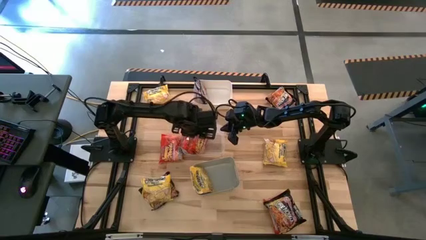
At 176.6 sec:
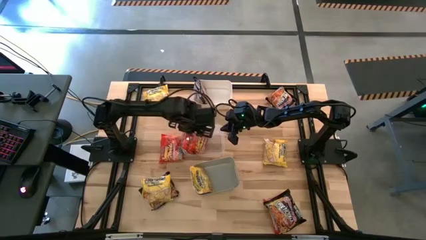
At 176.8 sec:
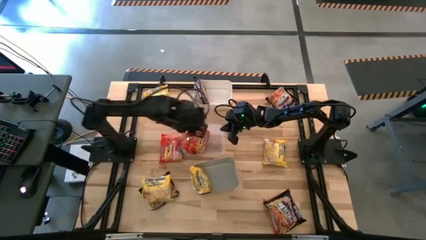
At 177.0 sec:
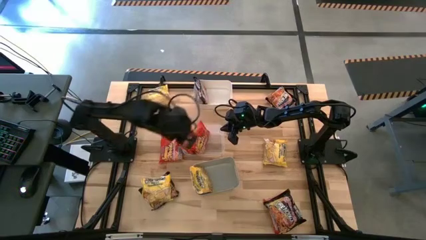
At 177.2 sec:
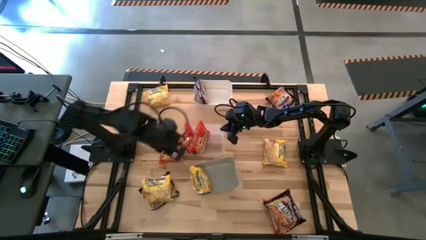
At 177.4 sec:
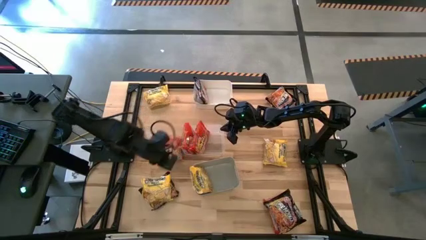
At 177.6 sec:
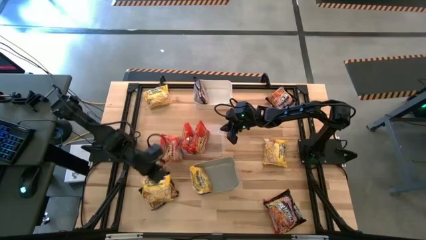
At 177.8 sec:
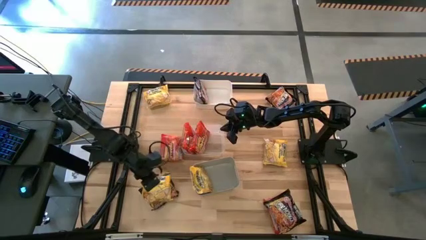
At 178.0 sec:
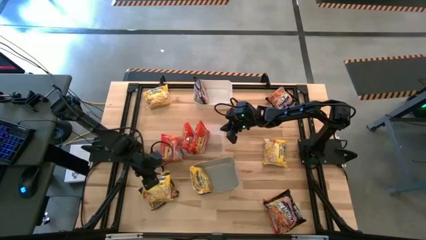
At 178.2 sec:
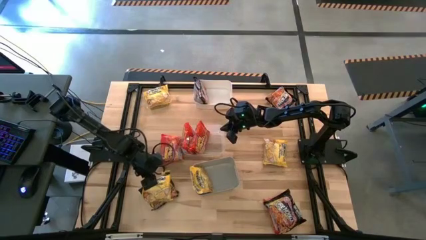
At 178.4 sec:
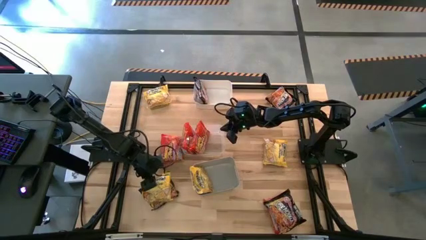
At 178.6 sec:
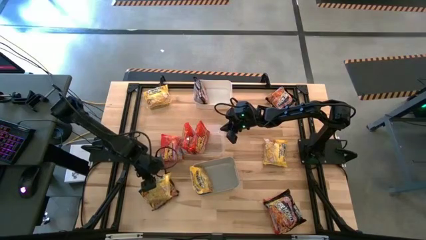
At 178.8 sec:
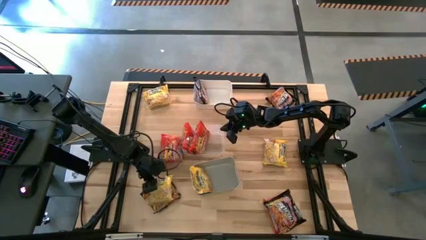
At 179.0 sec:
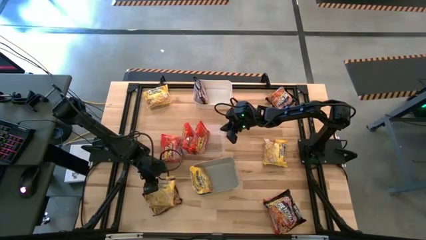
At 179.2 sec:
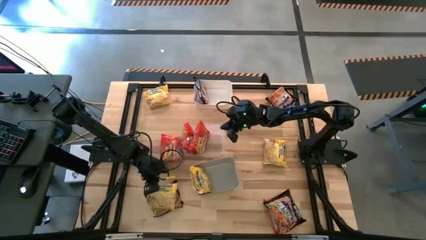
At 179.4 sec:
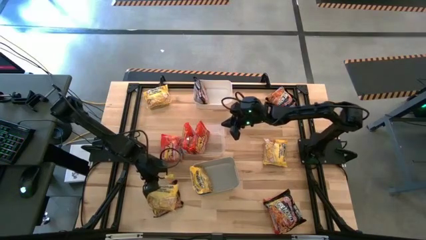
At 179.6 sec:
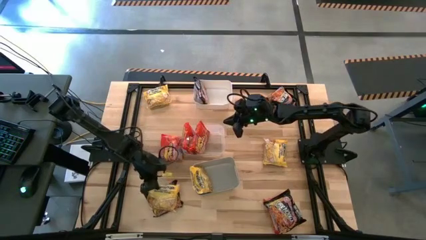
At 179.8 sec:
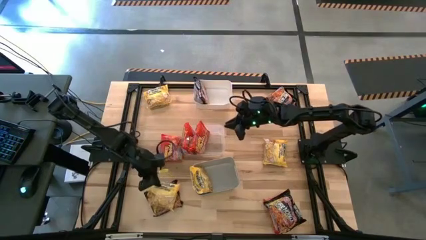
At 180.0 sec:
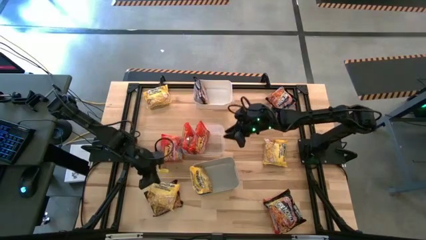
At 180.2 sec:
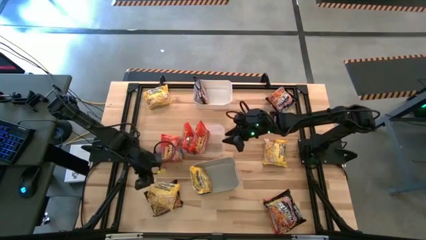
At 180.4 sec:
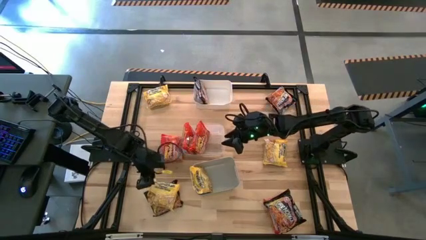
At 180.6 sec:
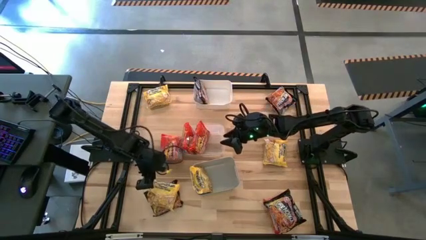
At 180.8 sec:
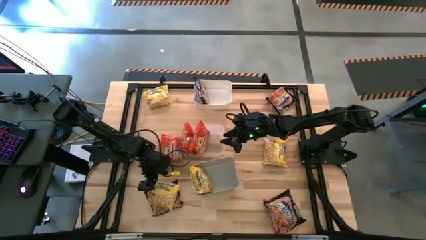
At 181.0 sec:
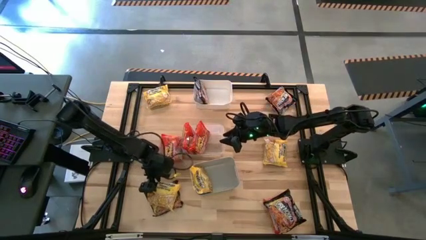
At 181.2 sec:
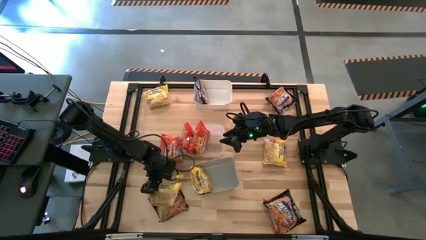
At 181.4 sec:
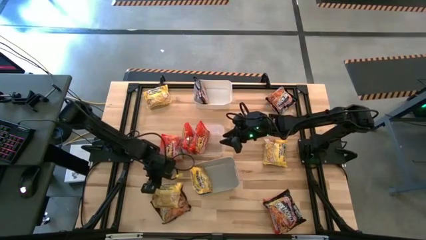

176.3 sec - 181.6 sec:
Task: Sort Maruchan noodles
Put the yellow noodle pack into the gray bin

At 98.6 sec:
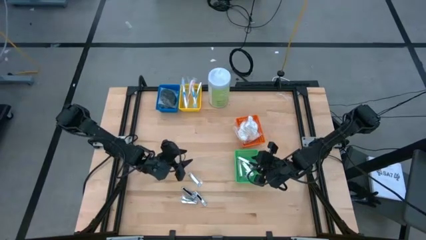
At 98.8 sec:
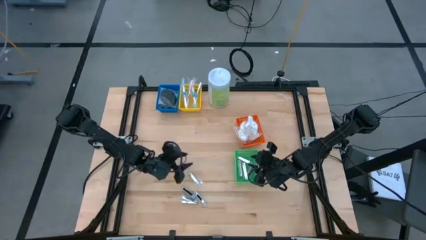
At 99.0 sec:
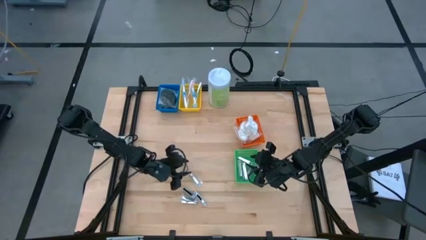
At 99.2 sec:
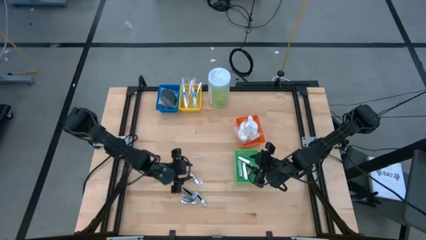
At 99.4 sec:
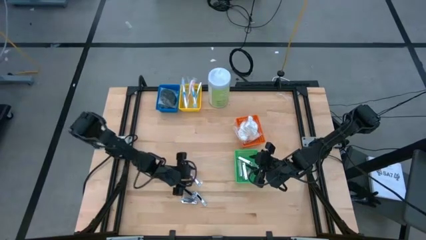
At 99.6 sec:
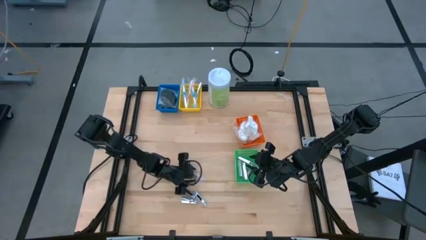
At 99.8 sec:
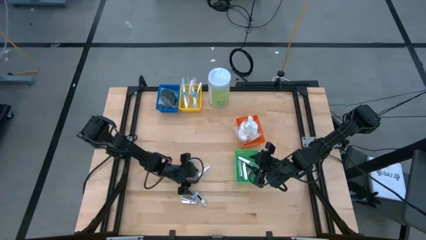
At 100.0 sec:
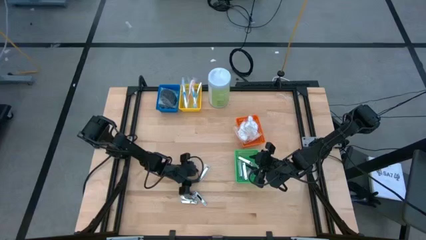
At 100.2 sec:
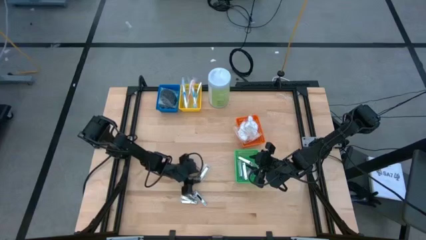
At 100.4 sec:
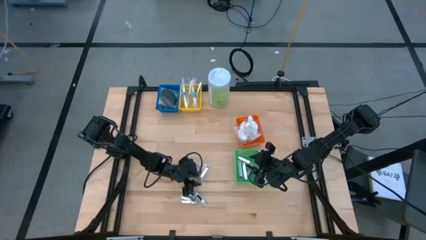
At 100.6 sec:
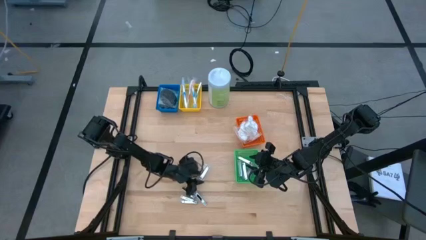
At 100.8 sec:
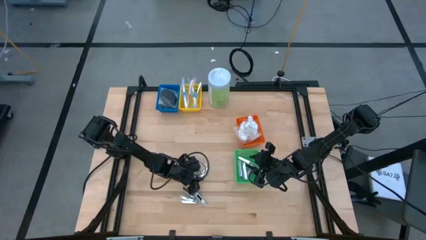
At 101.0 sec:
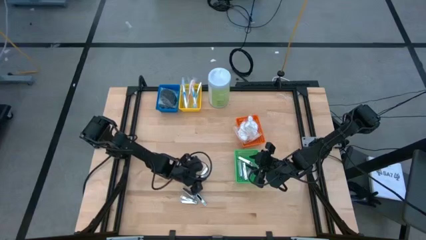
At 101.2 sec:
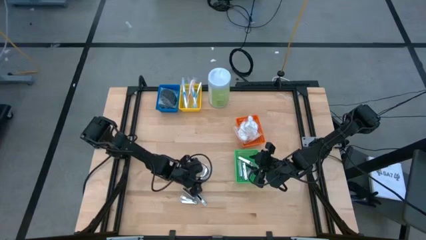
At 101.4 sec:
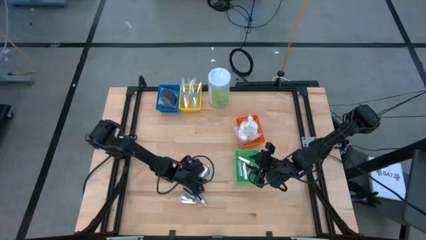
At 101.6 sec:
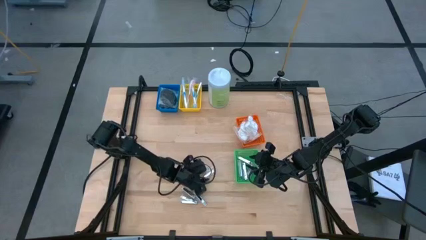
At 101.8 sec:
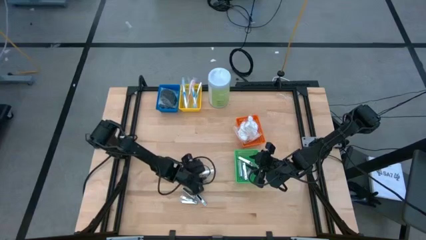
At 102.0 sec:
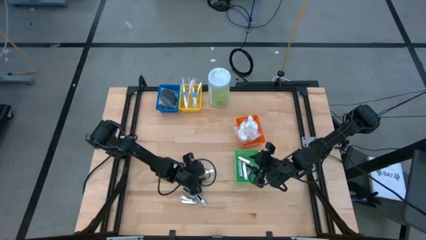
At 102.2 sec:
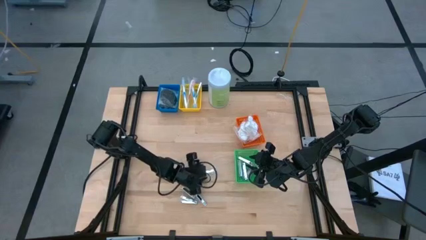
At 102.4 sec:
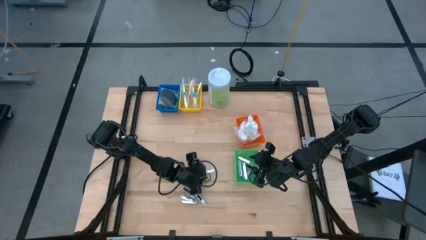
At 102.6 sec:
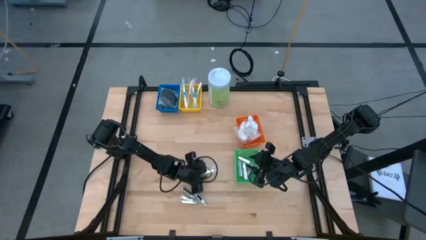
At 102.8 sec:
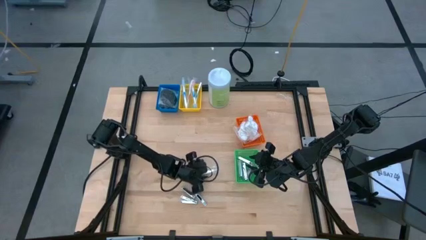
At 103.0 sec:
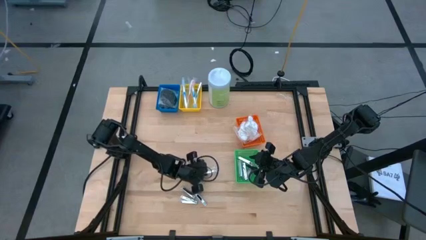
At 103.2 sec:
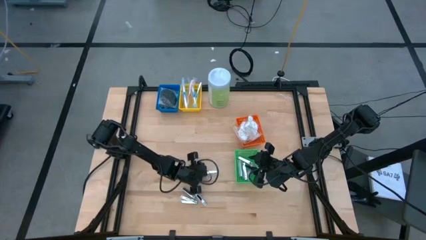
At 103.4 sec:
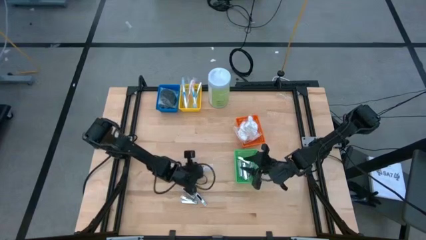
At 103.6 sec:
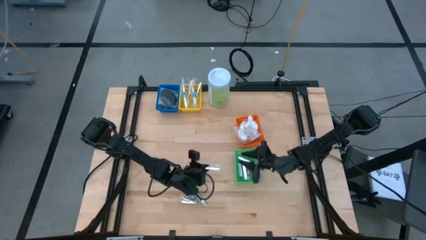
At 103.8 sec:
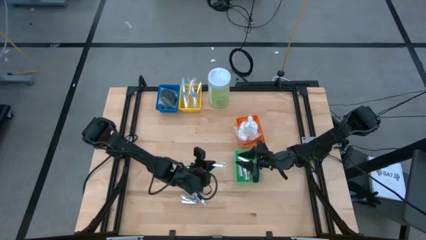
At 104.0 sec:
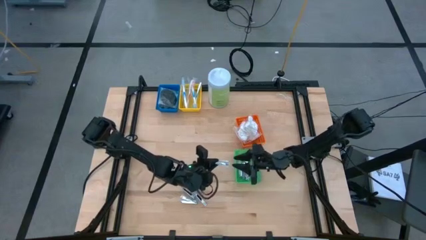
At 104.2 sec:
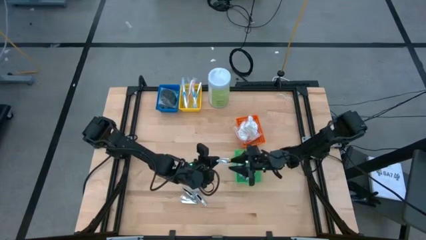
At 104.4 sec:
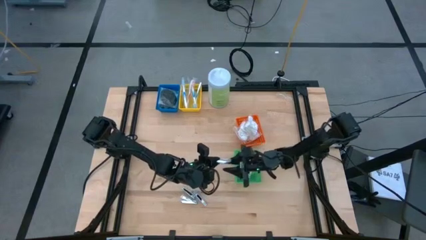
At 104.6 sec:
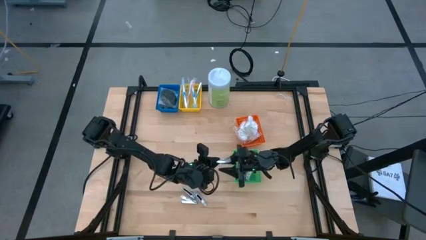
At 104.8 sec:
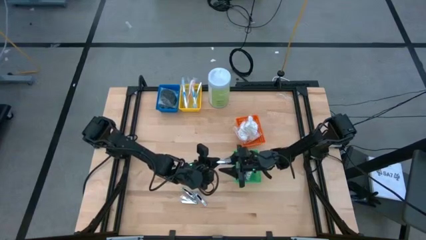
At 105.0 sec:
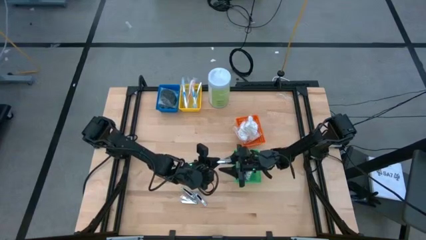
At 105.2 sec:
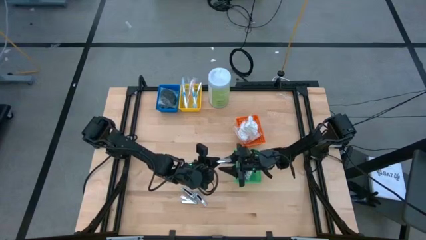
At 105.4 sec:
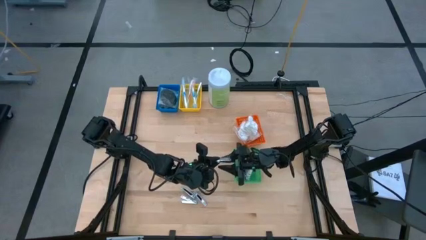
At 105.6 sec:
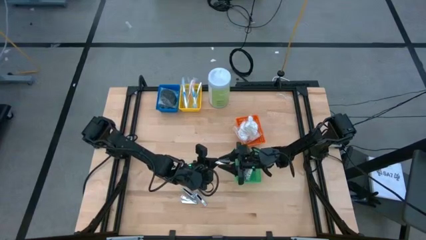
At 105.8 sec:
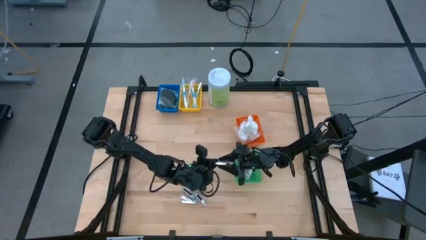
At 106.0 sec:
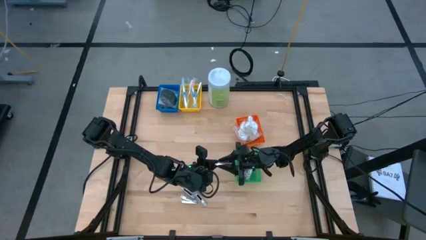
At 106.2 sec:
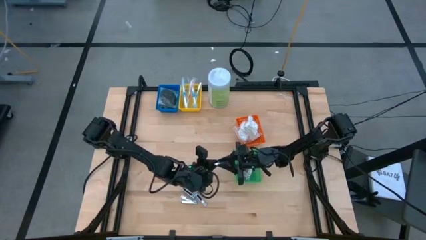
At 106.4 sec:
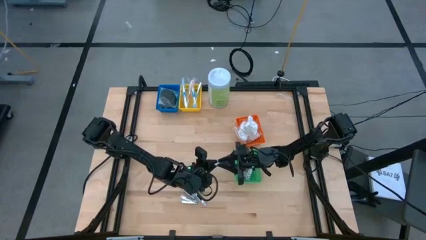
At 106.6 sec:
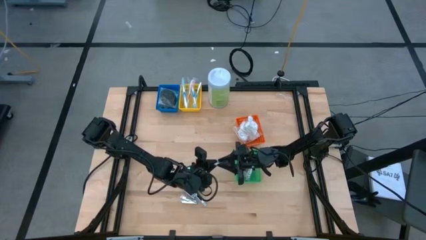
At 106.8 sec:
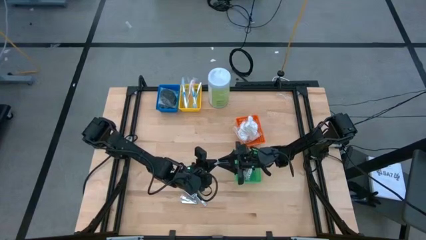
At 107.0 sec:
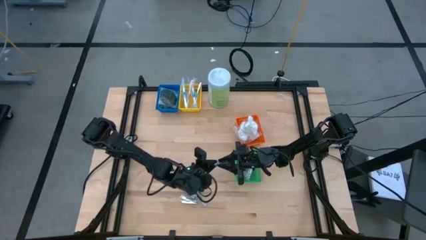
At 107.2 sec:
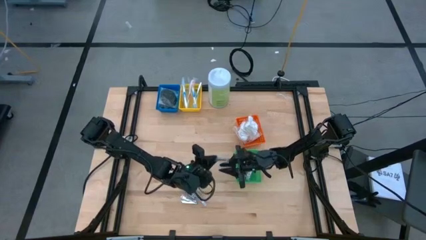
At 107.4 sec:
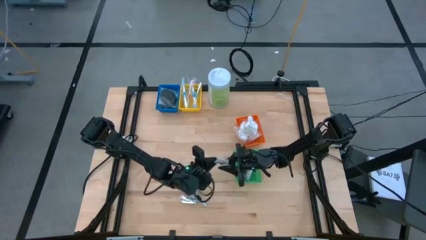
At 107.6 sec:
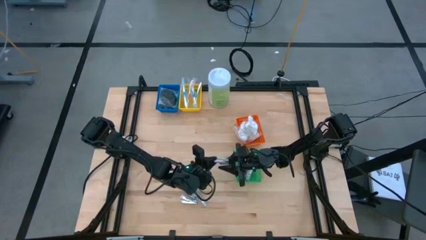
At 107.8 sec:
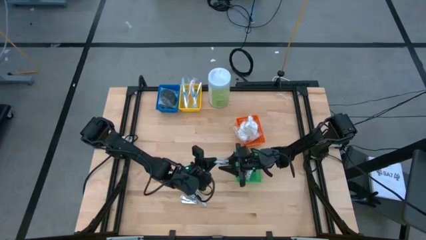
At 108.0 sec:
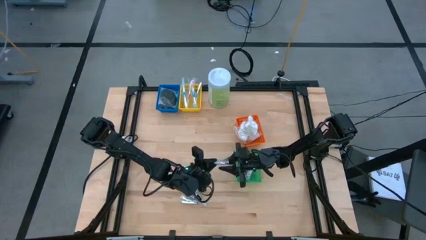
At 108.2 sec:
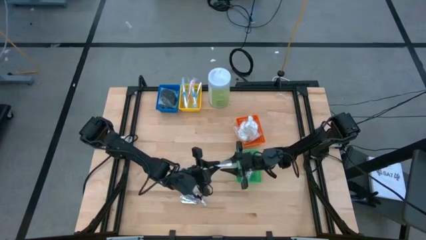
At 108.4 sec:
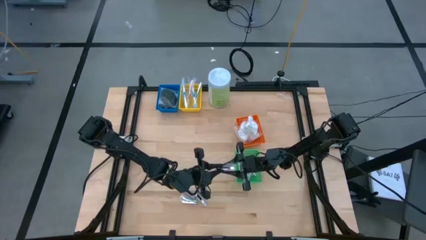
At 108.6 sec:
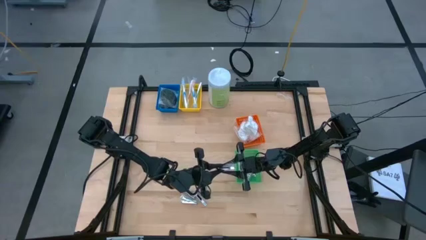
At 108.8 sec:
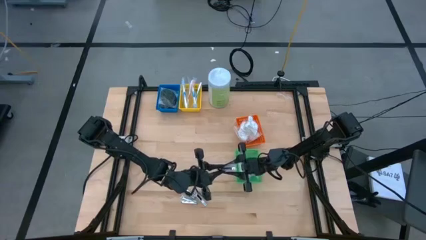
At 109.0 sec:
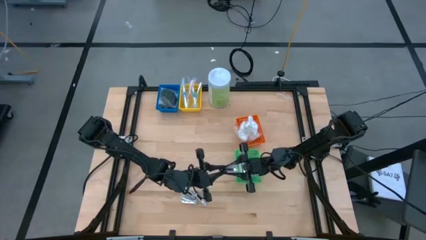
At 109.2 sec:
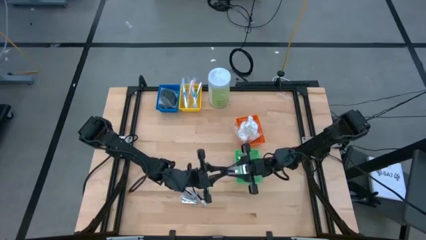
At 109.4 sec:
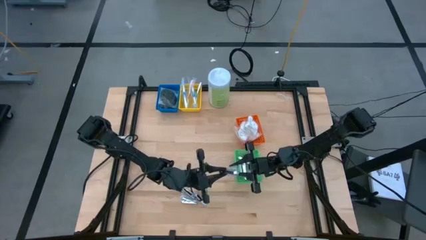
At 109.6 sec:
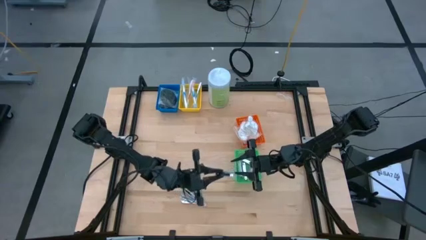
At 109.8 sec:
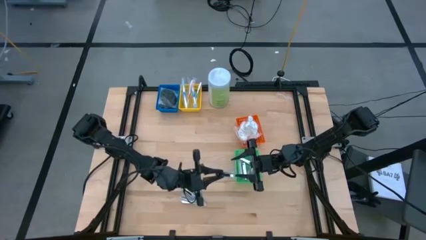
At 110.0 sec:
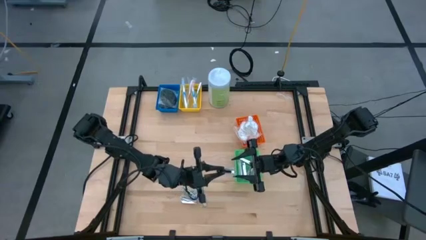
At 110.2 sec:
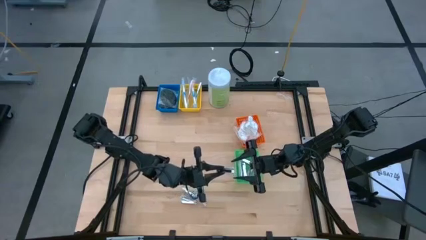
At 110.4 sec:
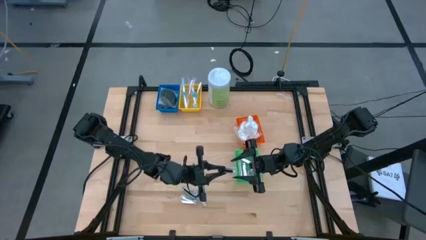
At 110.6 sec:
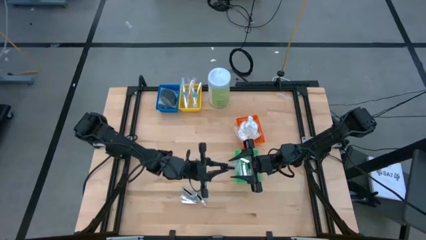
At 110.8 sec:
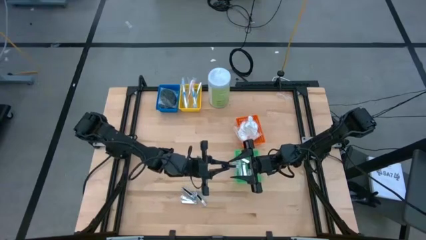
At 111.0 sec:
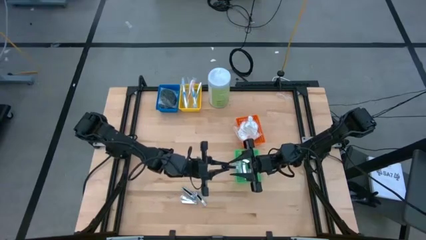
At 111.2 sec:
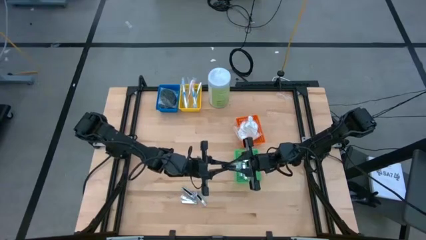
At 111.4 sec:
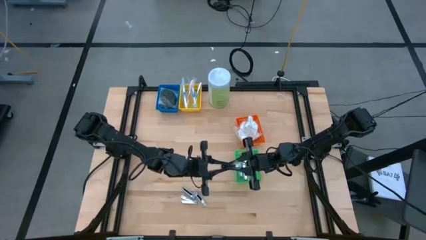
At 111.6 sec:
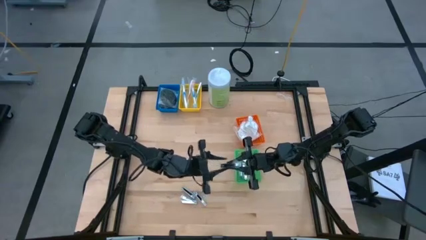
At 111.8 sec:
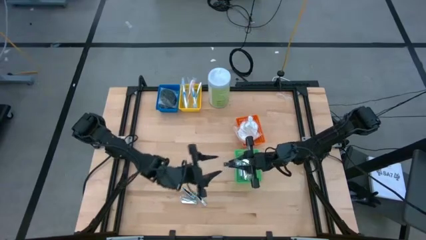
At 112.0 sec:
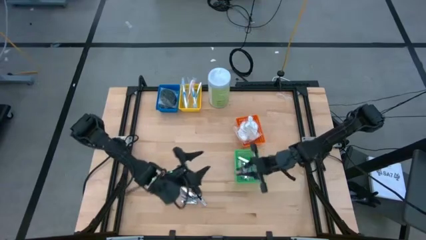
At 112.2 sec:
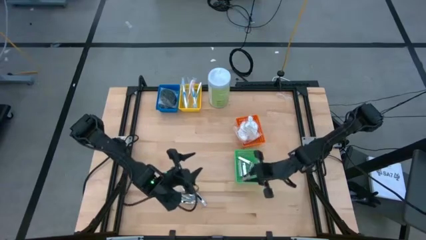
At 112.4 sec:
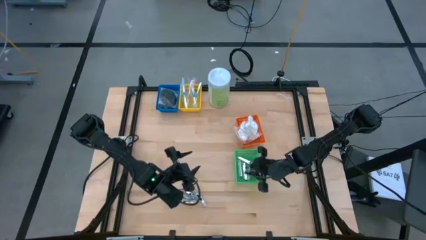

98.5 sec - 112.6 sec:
Task: Pick & Place Travel size toiletries
Put the nail cutter into the green bin
